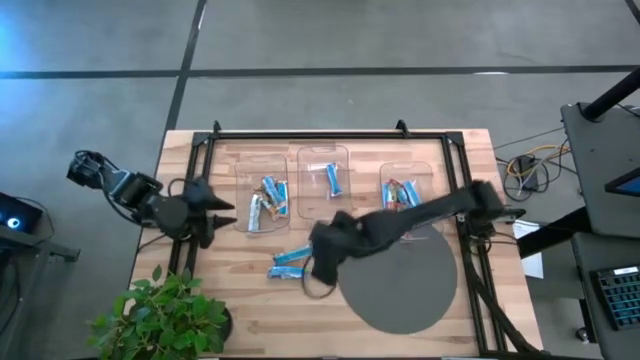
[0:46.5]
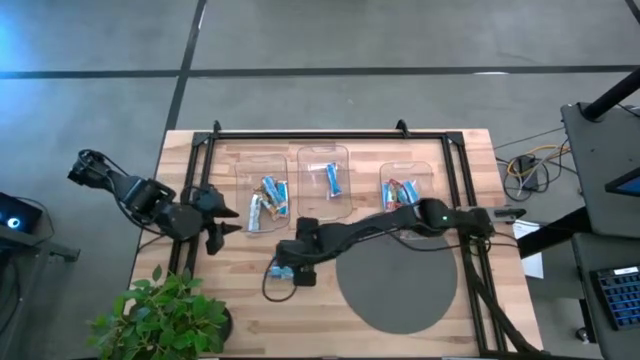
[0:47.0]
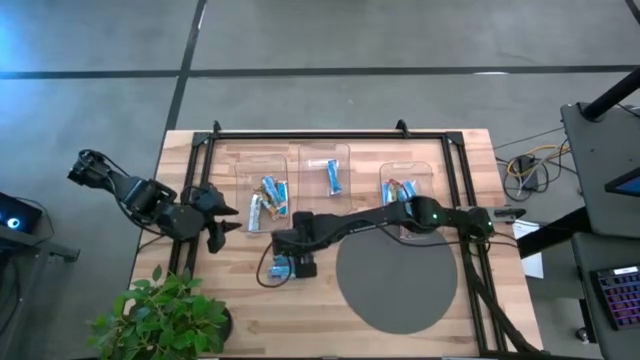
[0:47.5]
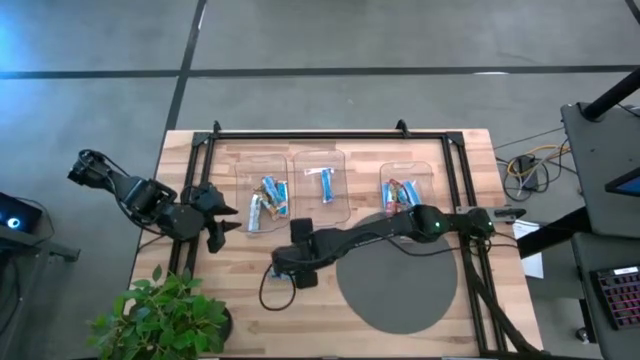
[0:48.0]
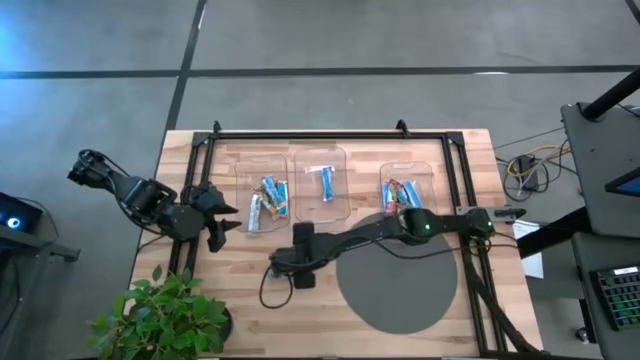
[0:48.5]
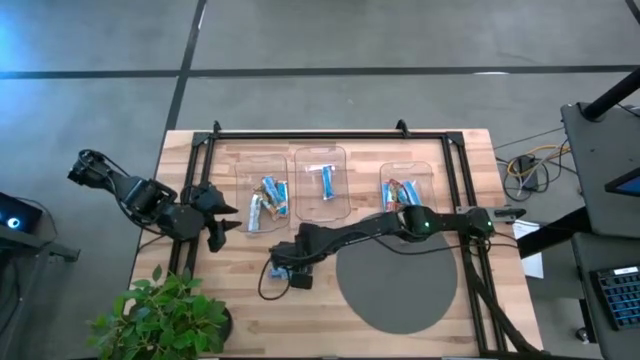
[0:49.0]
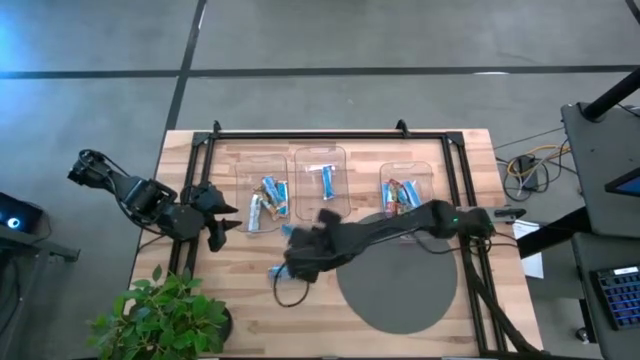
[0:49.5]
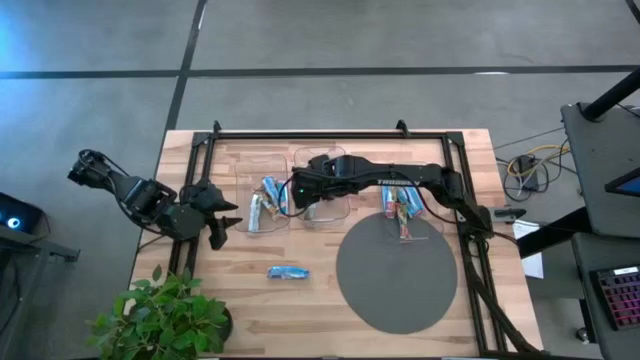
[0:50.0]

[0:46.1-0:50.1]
Task: Pick and place Granola Bars by type
Put the blue granola bar into the middle transparent bin

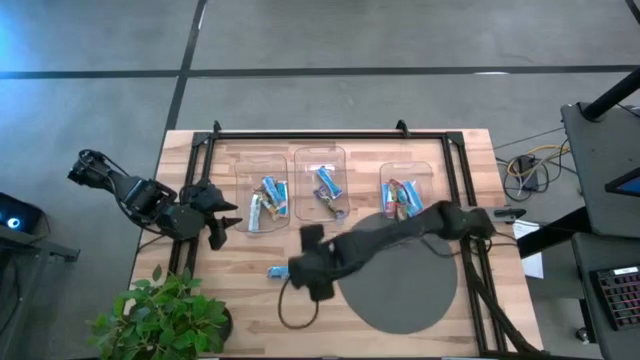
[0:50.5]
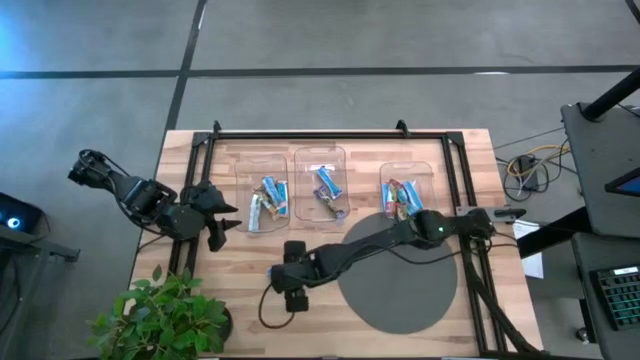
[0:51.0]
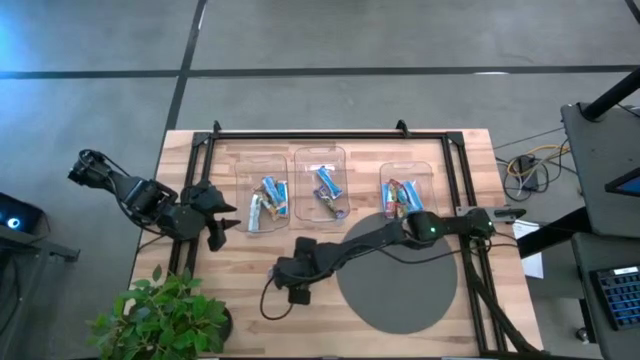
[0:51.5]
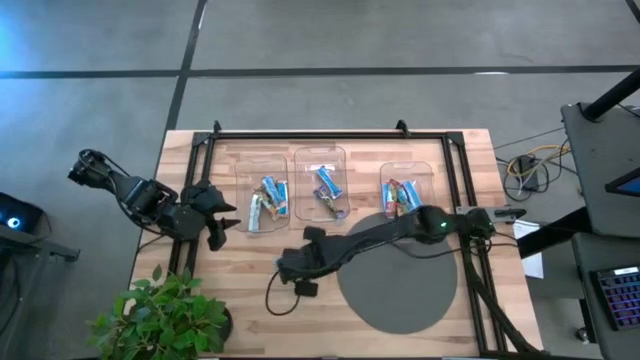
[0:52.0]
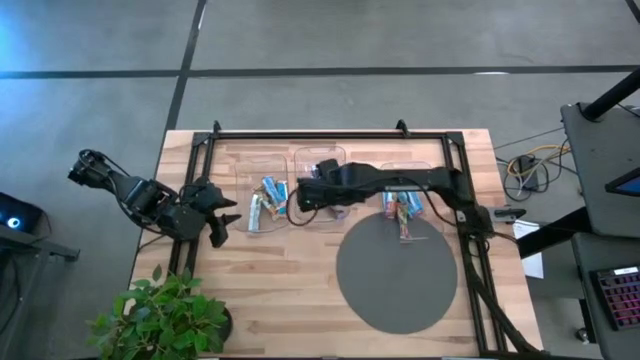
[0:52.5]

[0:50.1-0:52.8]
Put the blue granola bar into the middle transparent bin

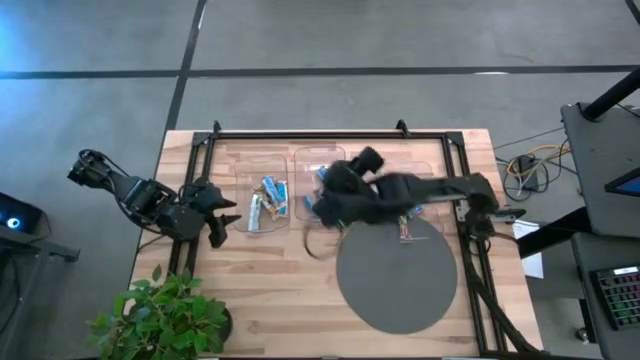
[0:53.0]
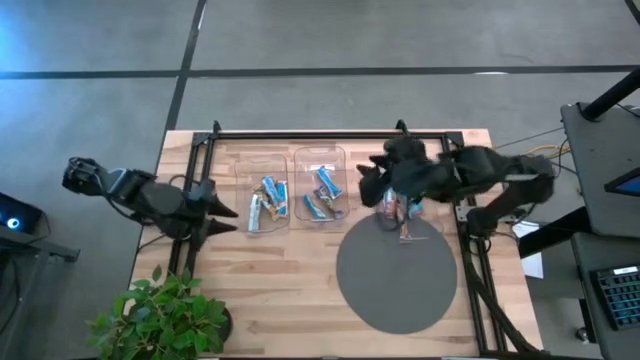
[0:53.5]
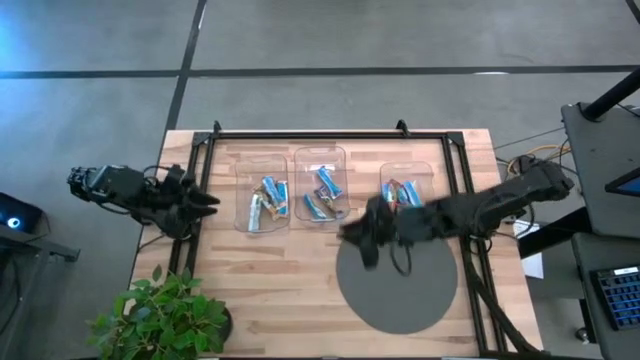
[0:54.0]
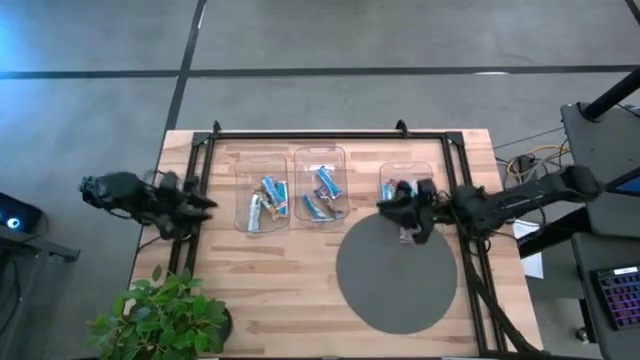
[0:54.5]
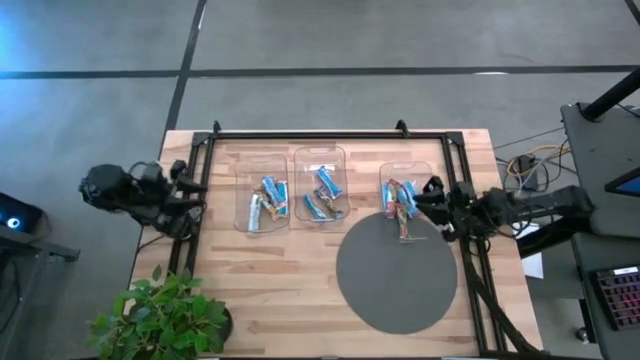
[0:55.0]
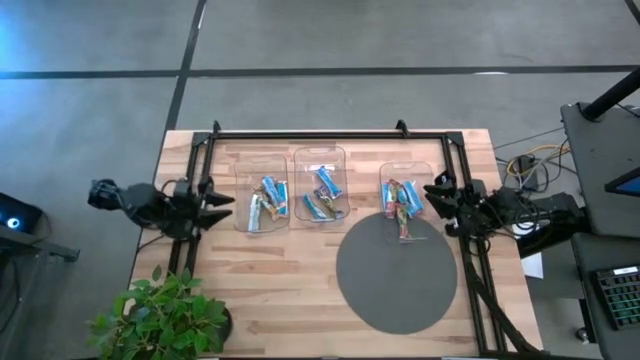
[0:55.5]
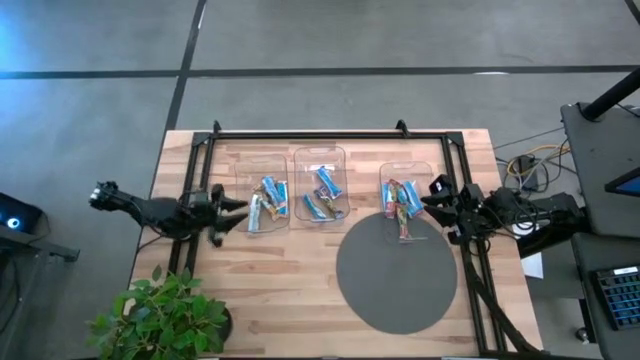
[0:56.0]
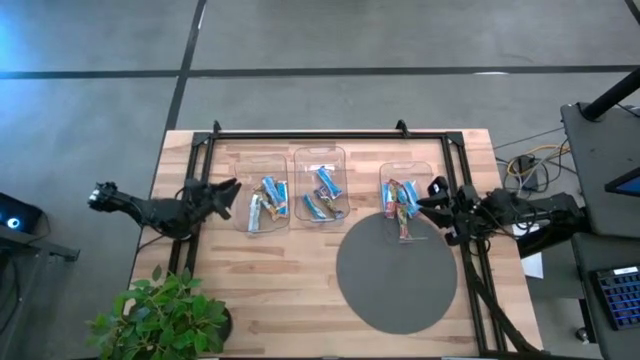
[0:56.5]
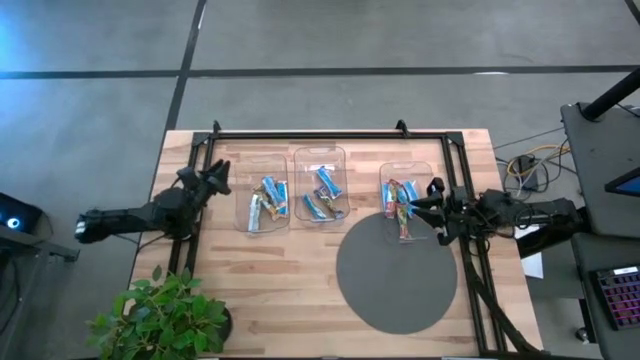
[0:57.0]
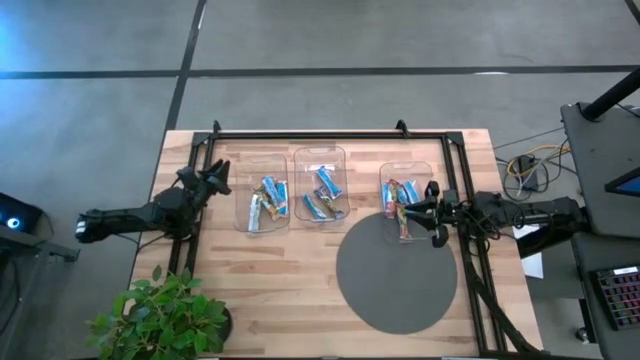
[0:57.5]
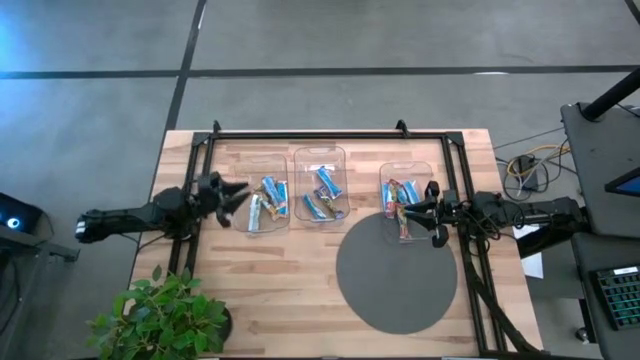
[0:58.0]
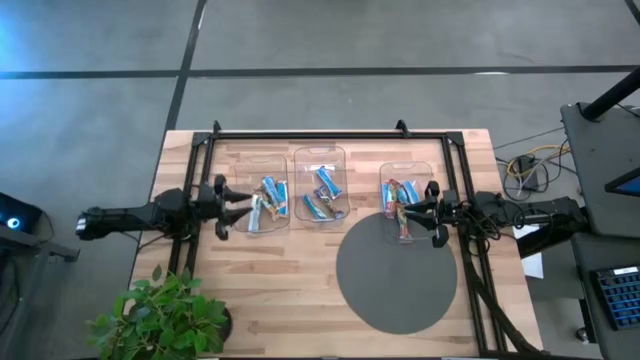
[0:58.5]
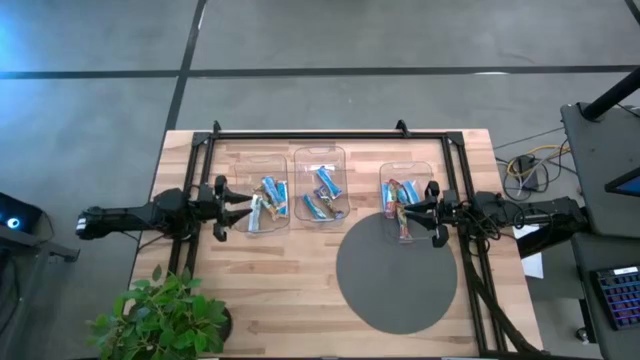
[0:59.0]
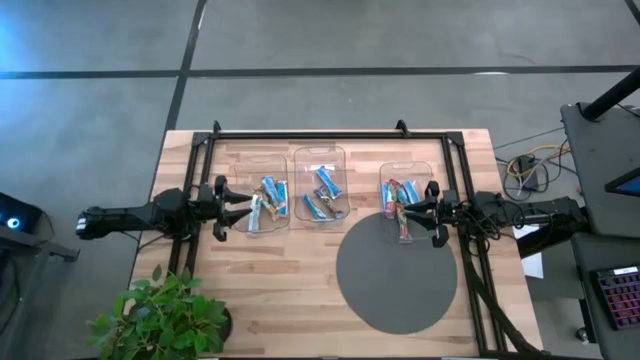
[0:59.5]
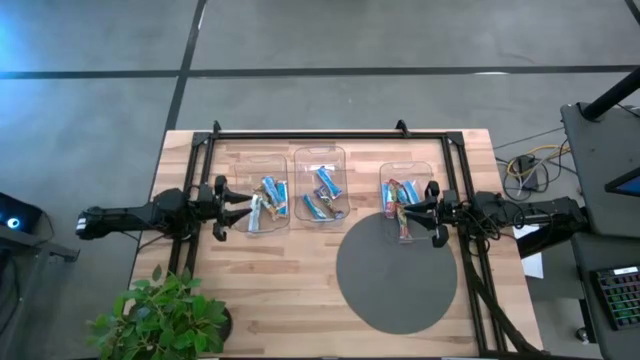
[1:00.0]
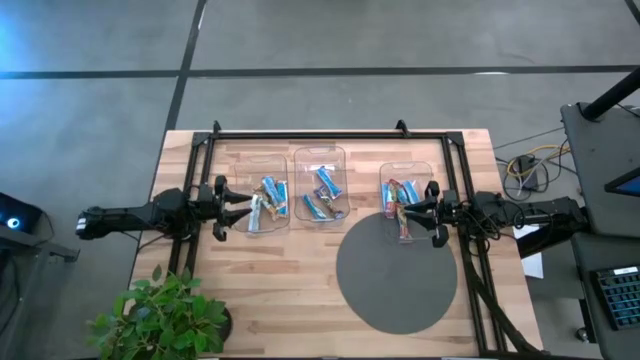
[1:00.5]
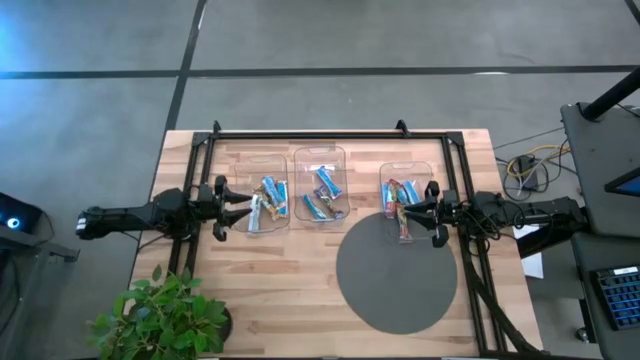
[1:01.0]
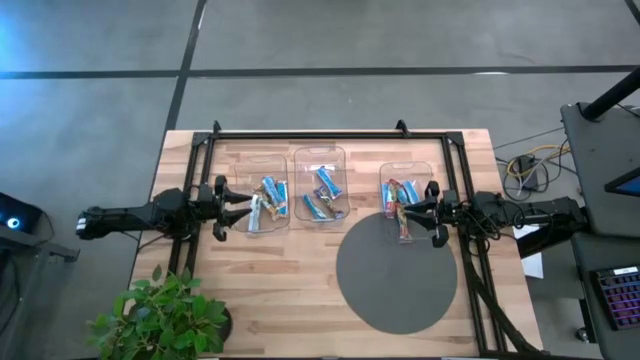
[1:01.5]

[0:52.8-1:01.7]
Return to Home Position

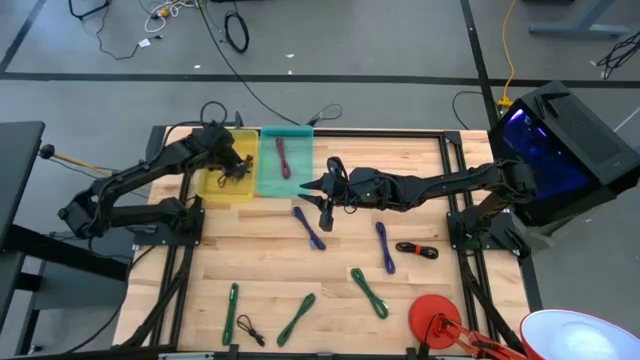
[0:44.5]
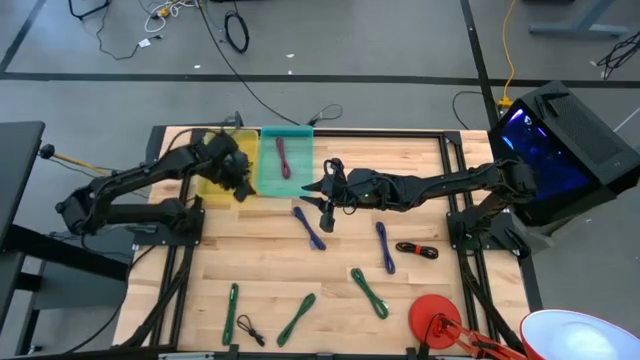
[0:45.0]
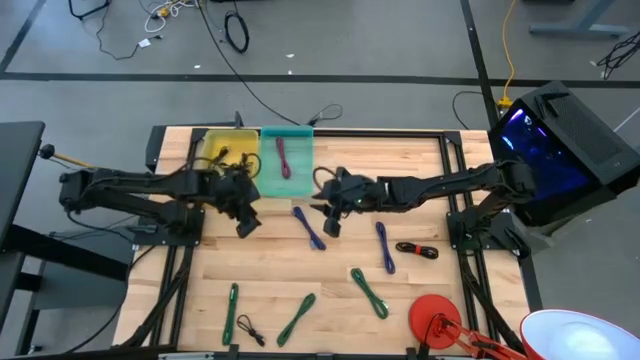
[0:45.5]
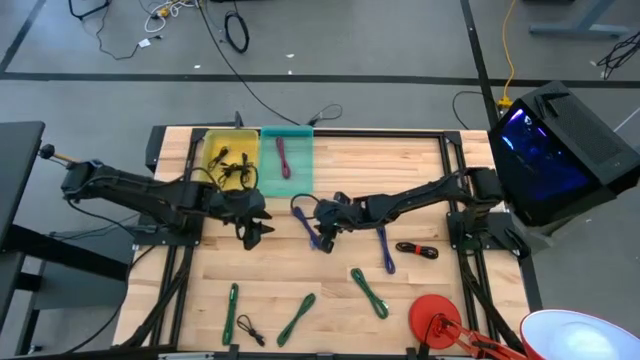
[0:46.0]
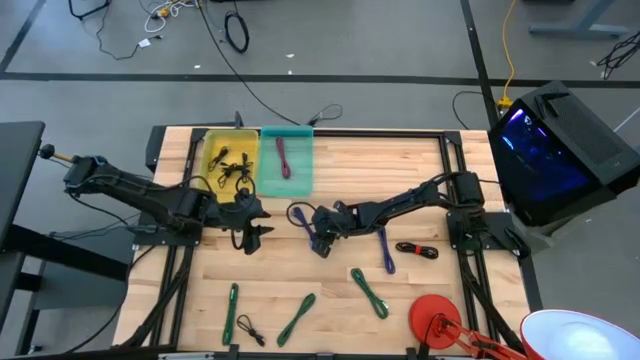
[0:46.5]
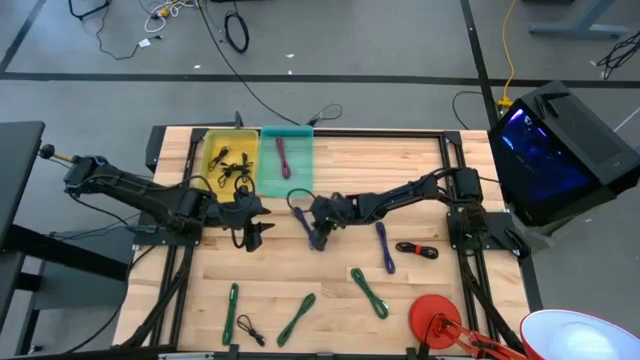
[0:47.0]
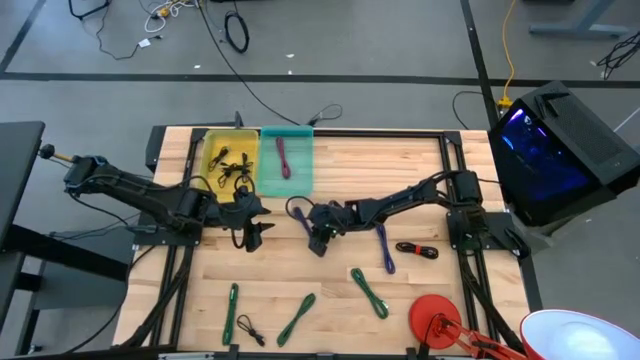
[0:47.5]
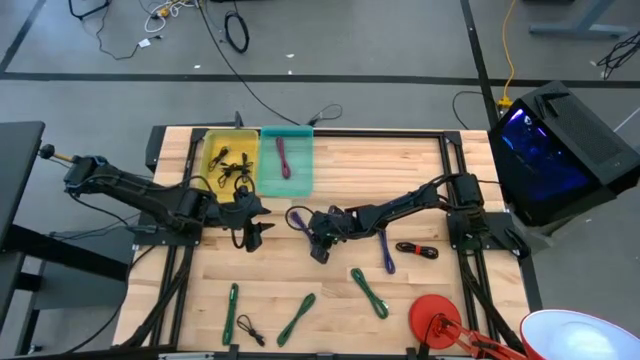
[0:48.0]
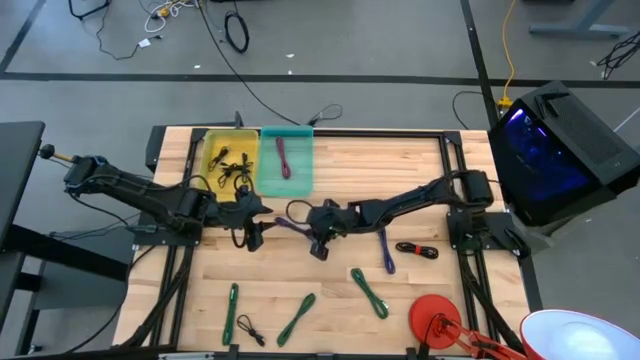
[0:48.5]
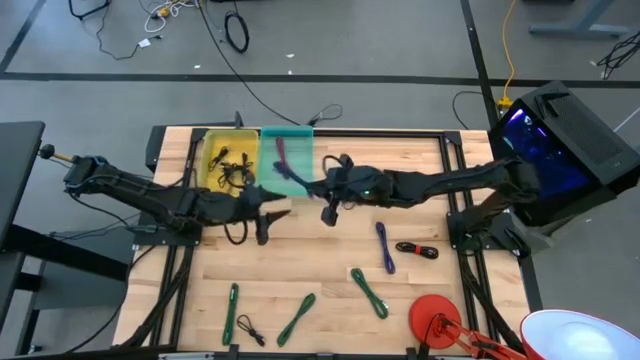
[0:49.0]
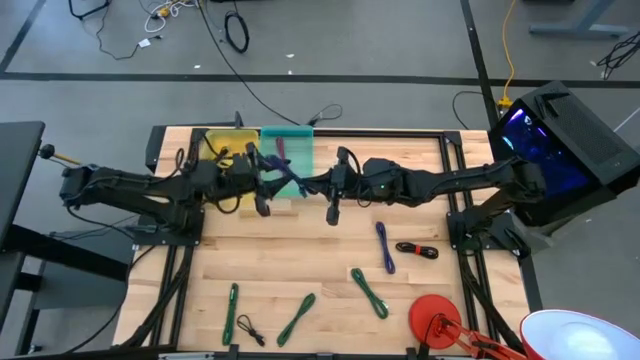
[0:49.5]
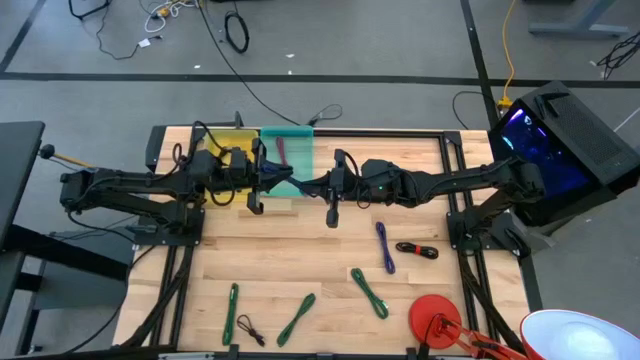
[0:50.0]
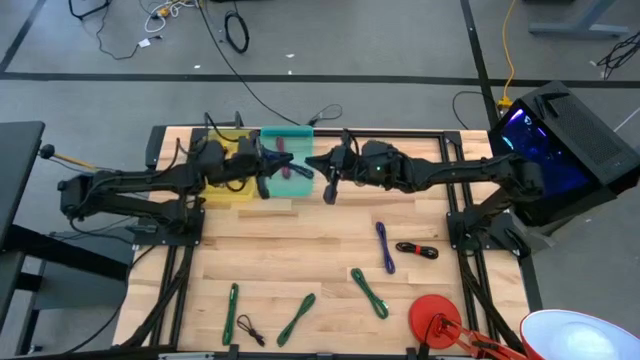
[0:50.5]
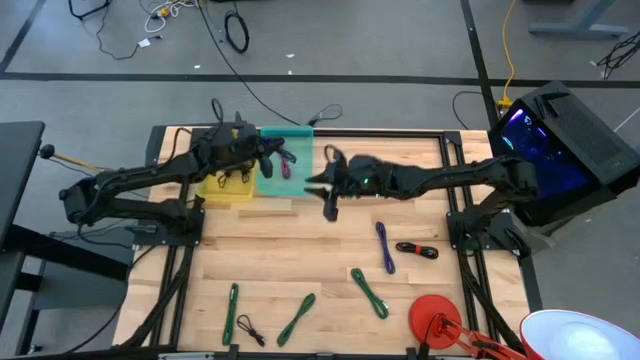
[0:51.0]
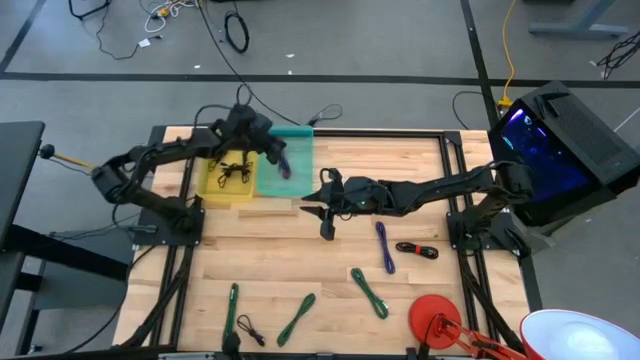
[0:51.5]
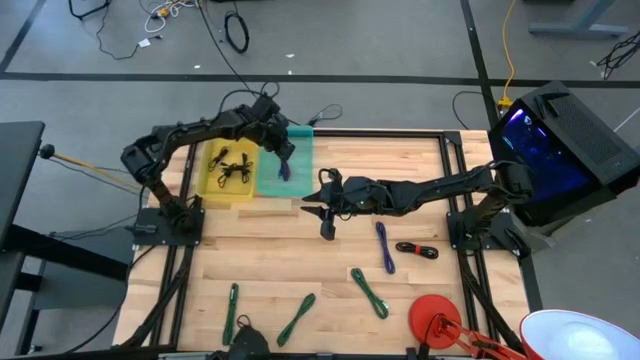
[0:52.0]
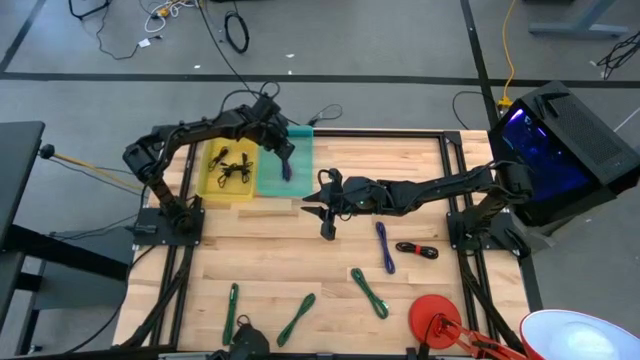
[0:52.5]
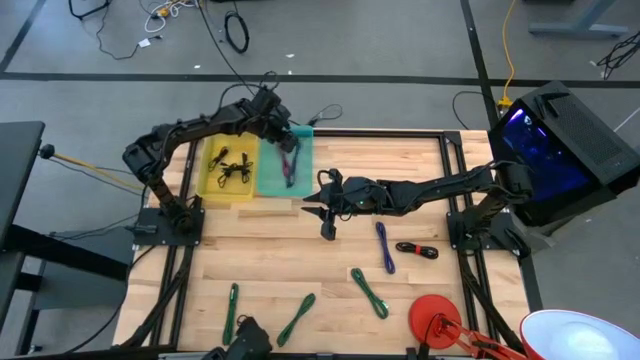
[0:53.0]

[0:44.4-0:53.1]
Task: Pick & Place USB Port
Put the purple charger cable into the green bin
